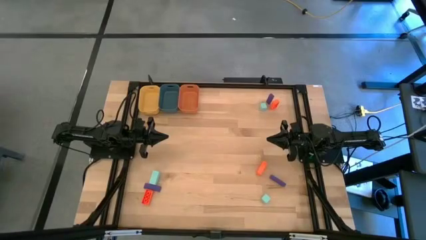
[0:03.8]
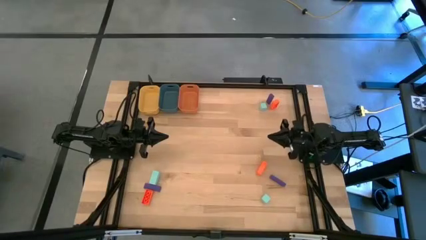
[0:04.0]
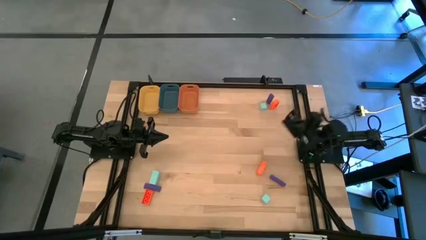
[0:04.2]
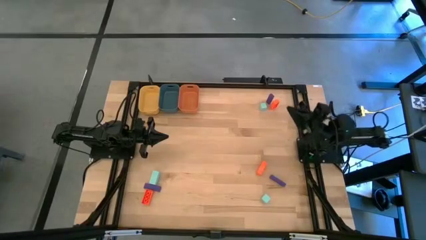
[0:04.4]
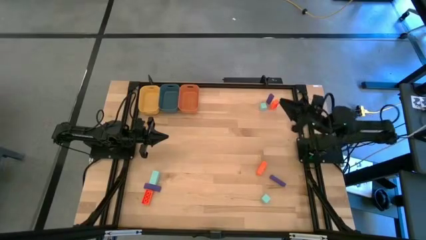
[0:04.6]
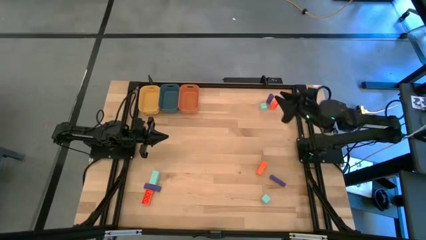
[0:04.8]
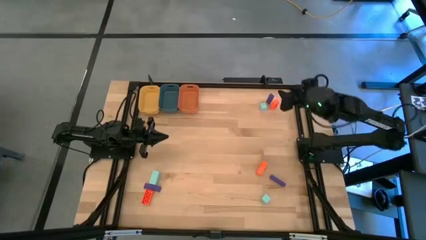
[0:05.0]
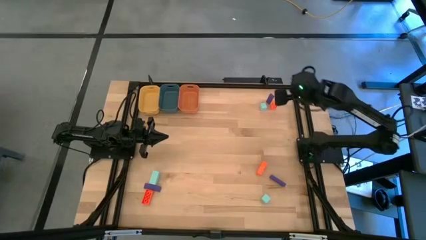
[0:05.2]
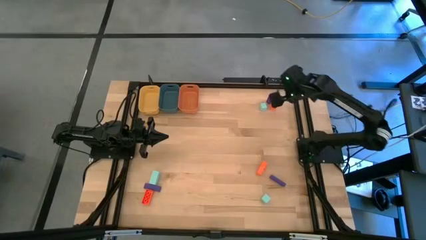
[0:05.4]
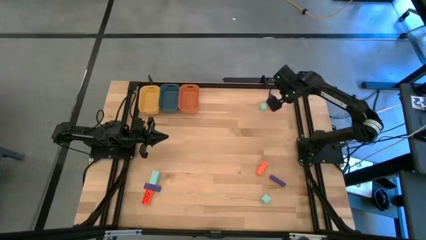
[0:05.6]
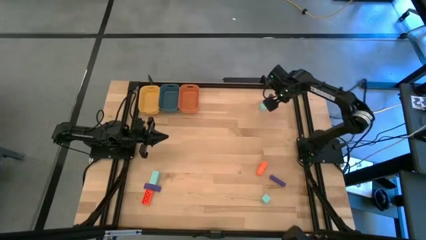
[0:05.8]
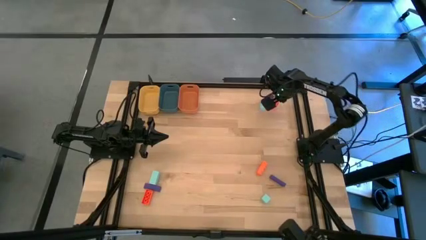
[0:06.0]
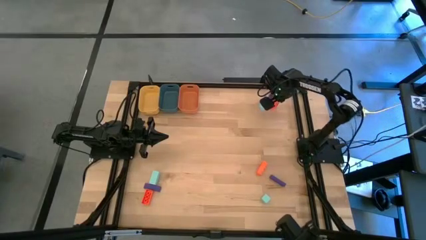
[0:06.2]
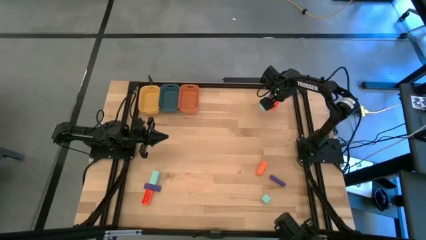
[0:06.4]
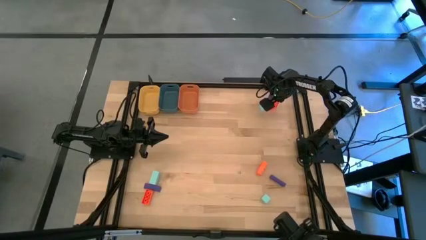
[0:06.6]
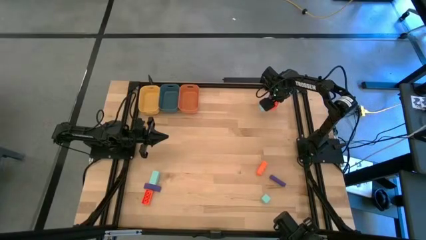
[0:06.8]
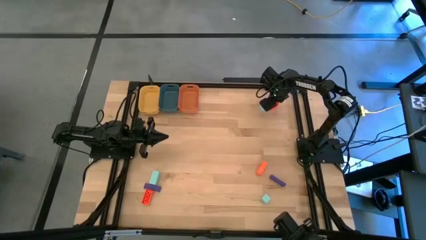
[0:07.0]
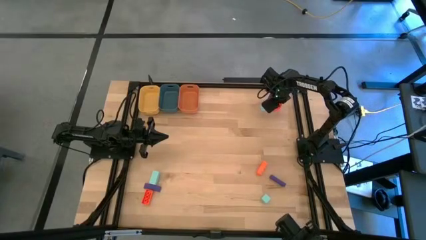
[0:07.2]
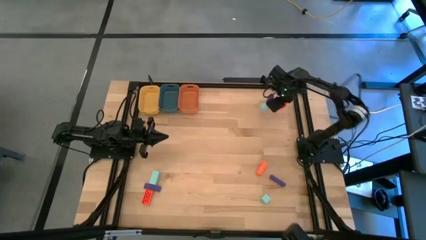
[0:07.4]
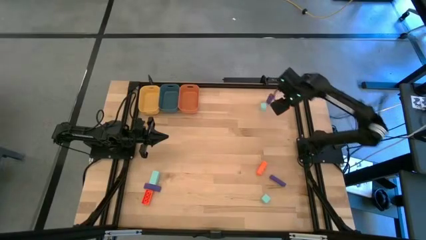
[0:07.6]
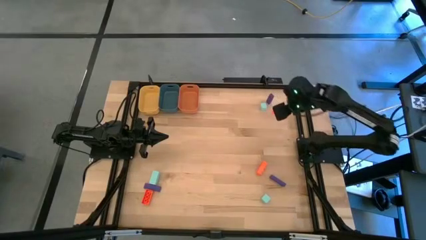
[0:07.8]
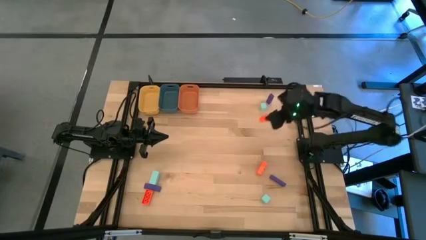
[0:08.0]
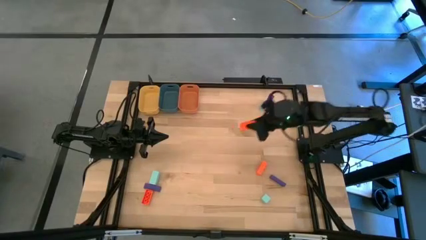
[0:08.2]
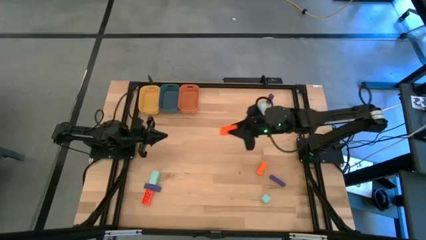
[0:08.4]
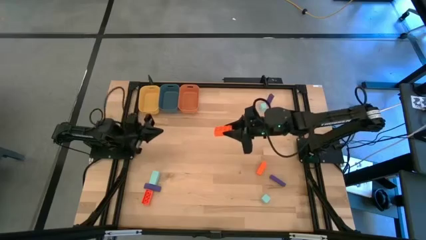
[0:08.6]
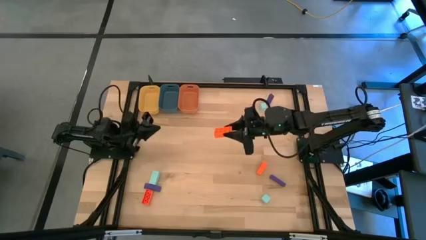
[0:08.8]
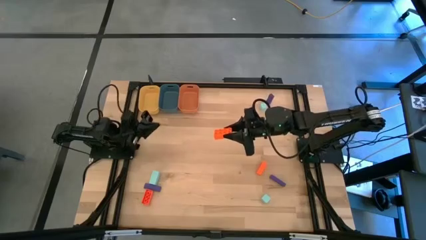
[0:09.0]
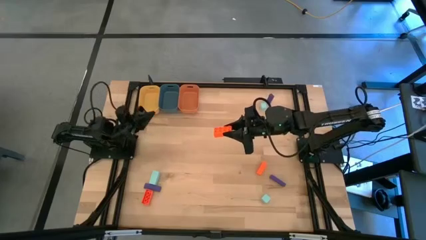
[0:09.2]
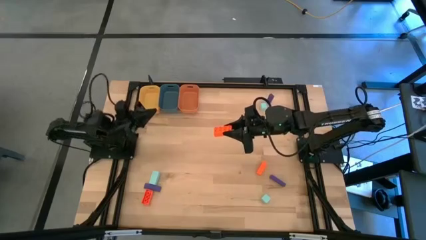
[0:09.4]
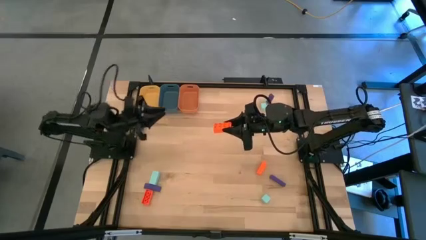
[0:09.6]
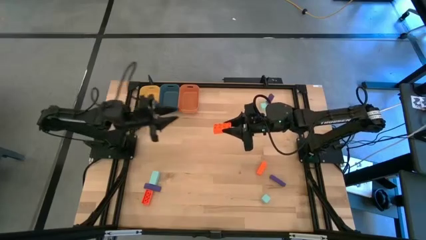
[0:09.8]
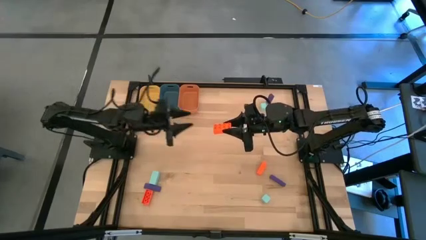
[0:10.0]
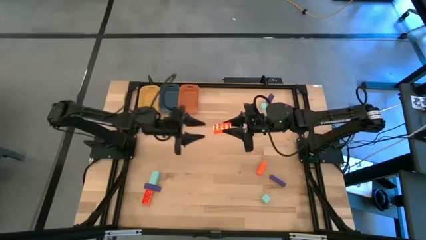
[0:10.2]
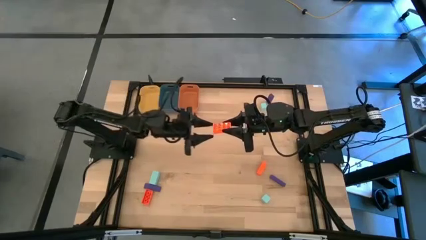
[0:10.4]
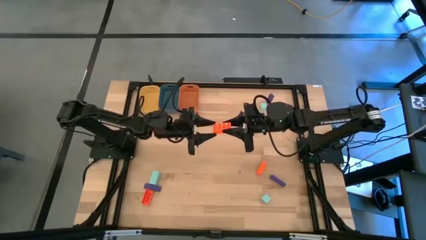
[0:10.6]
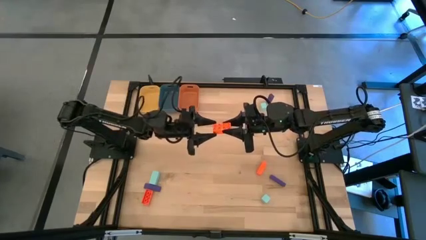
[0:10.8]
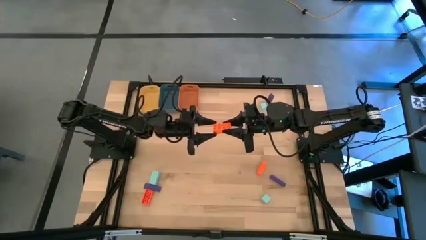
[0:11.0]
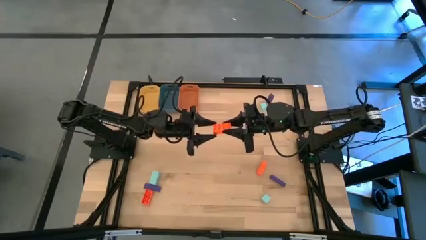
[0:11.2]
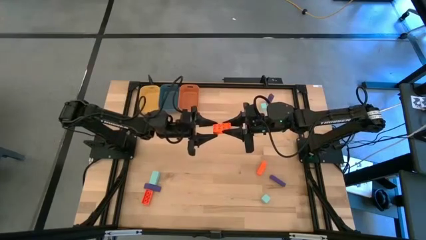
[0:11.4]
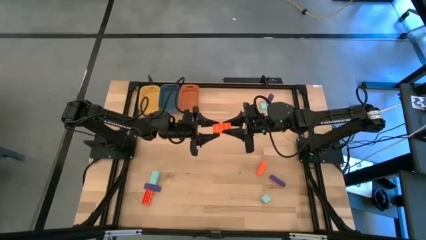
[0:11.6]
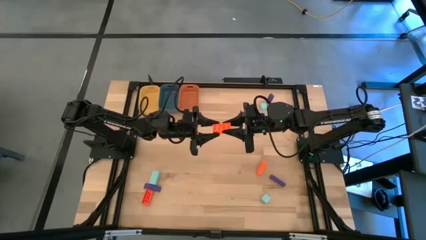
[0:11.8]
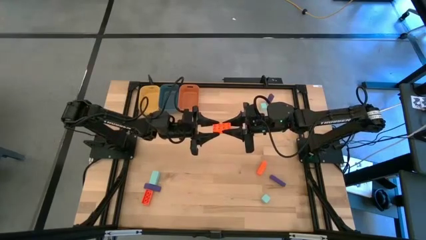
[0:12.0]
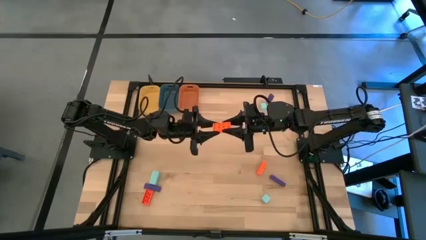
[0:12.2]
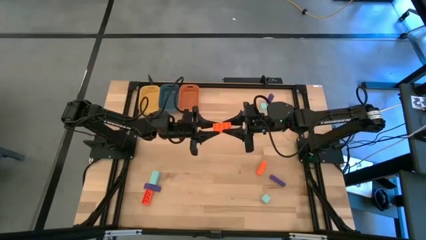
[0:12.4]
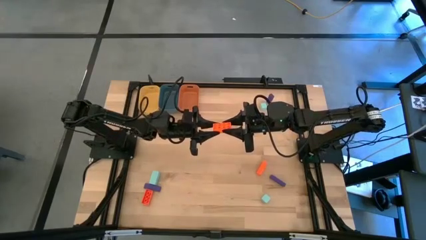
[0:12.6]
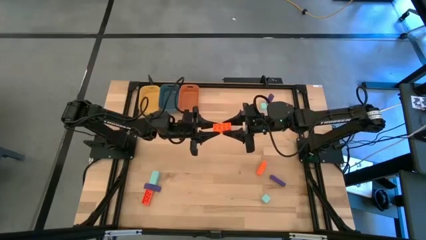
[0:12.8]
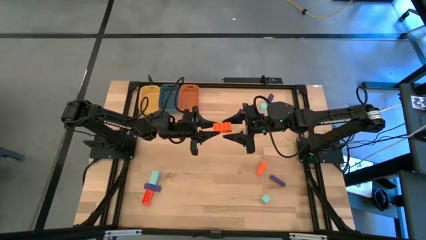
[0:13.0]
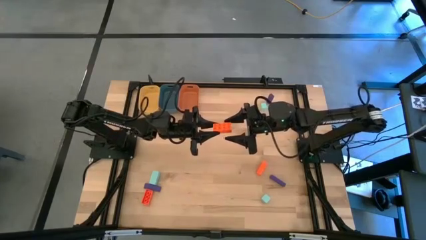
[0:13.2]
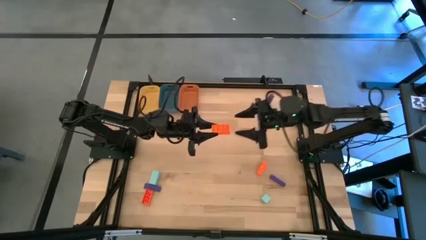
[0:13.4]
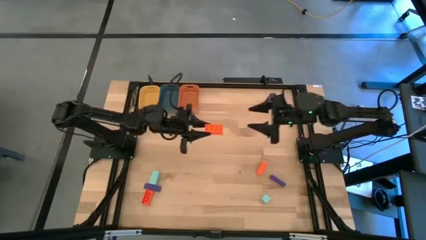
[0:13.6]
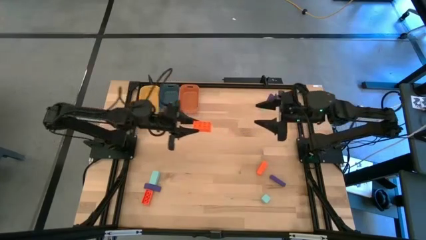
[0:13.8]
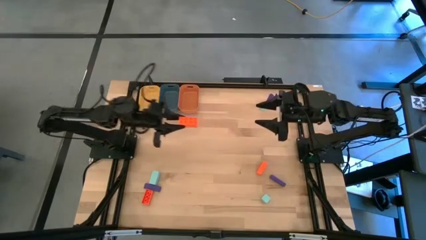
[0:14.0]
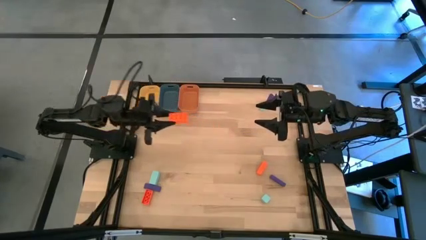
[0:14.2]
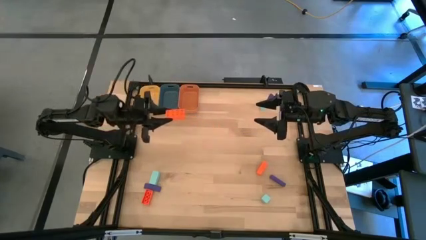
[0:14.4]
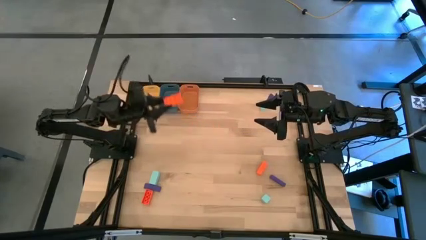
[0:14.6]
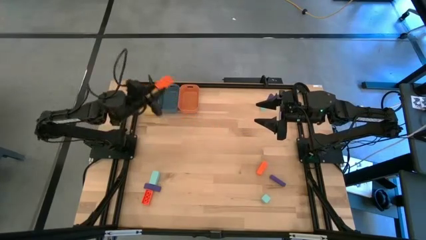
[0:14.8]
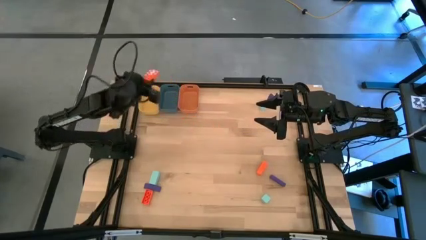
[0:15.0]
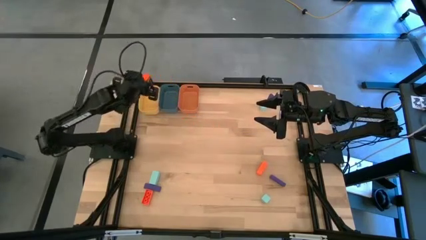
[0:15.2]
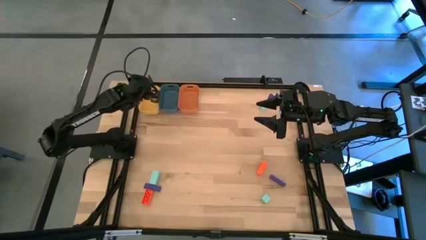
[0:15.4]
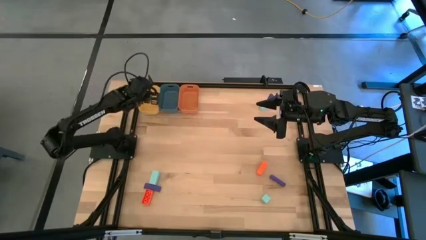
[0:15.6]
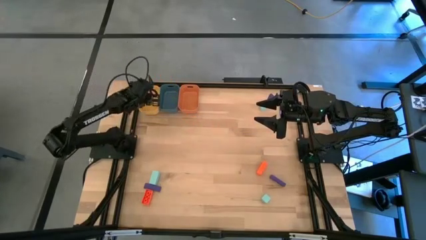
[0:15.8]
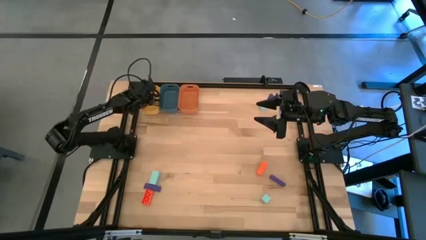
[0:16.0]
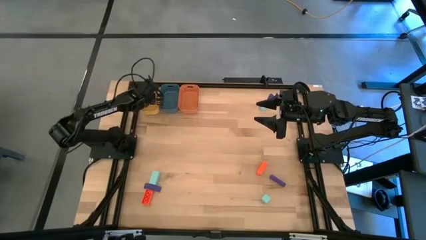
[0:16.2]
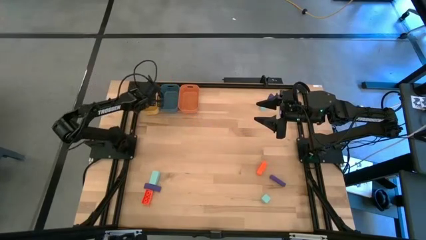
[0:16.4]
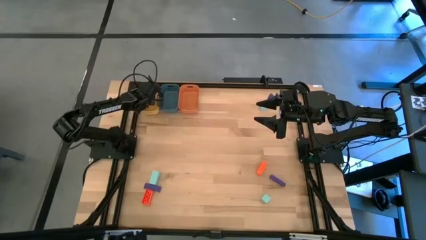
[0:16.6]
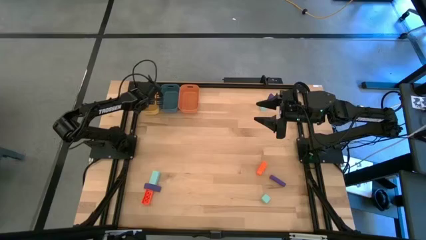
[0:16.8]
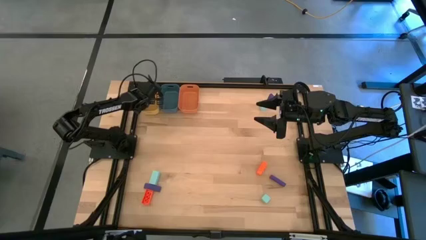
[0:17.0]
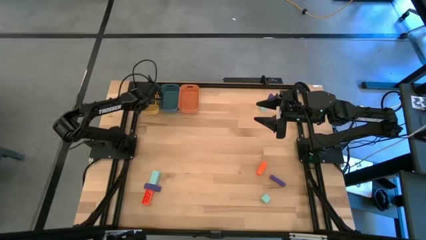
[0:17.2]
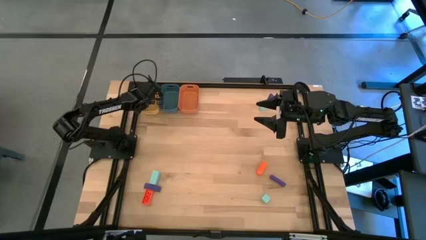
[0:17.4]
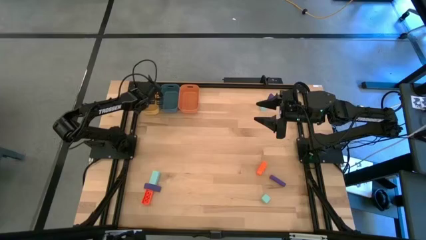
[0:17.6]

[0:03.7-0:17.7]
Task: Sort & place blocks by color
Put the top orange game piece into the yellow bin
